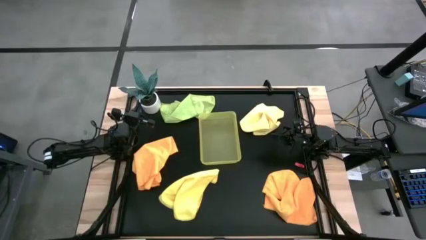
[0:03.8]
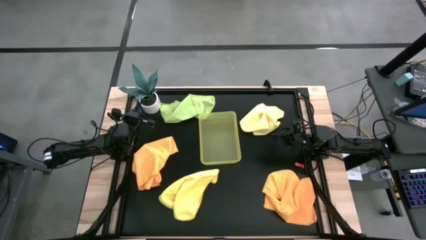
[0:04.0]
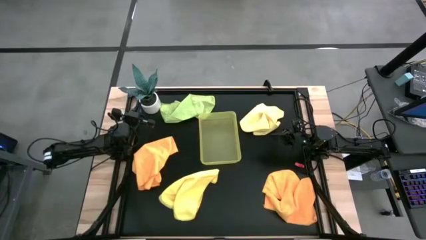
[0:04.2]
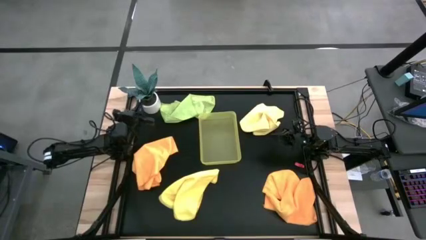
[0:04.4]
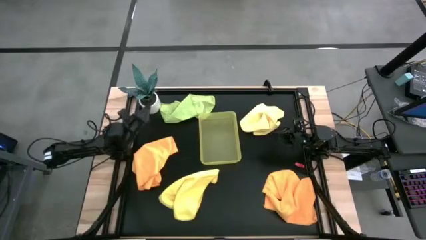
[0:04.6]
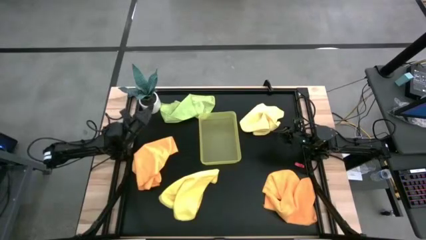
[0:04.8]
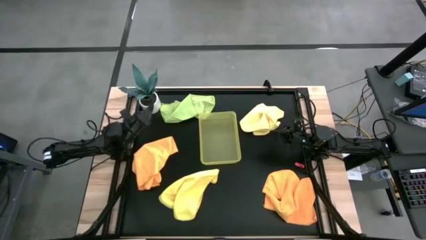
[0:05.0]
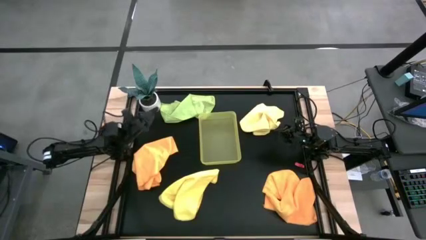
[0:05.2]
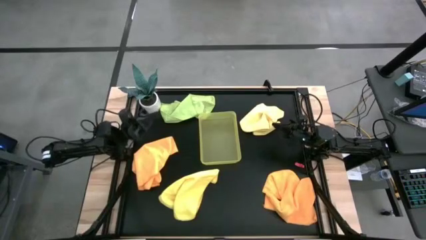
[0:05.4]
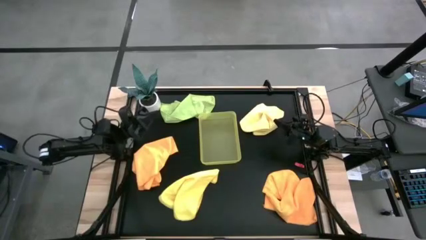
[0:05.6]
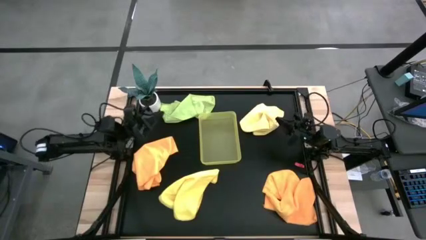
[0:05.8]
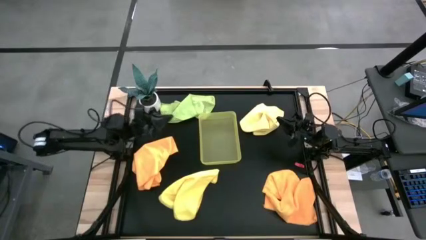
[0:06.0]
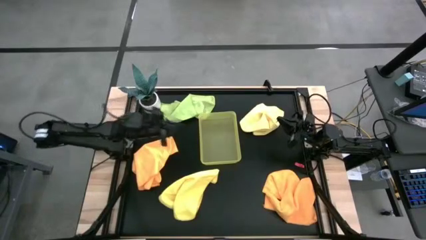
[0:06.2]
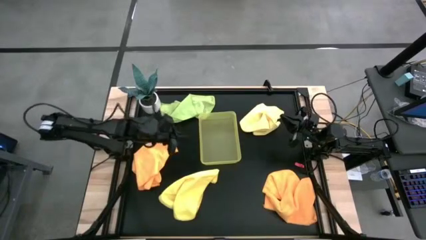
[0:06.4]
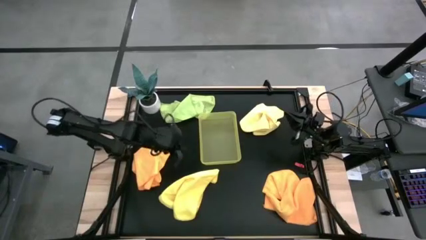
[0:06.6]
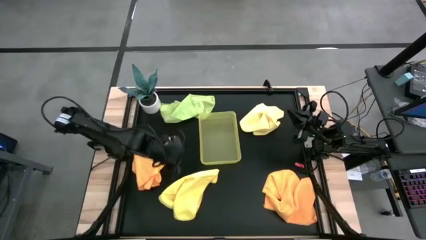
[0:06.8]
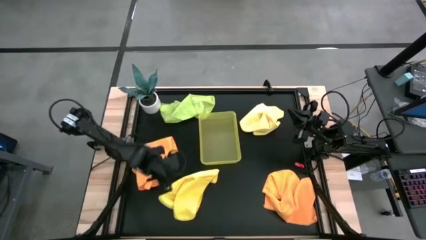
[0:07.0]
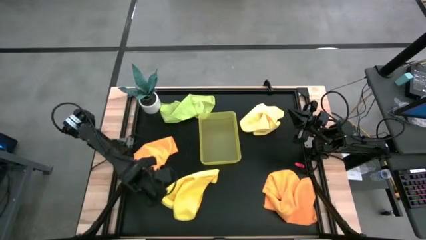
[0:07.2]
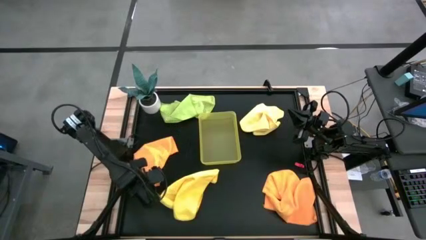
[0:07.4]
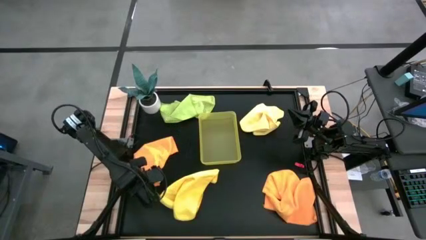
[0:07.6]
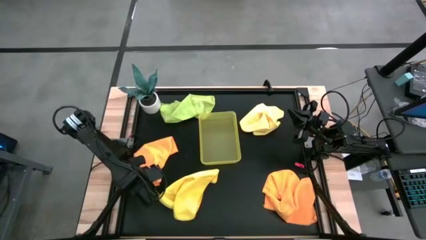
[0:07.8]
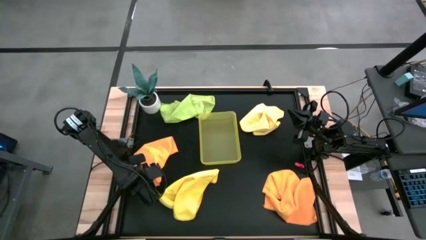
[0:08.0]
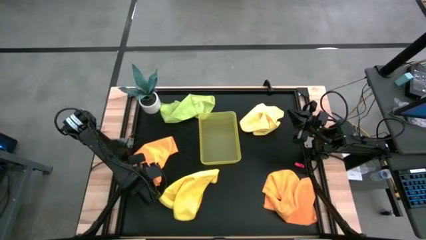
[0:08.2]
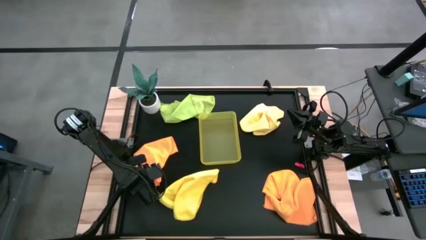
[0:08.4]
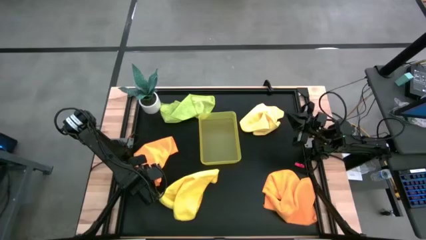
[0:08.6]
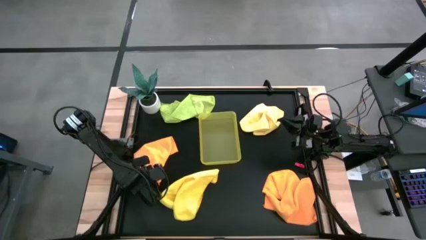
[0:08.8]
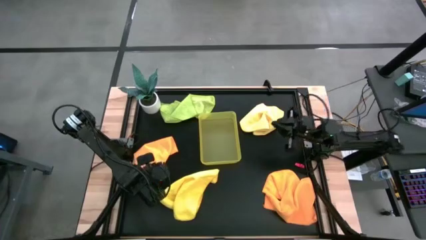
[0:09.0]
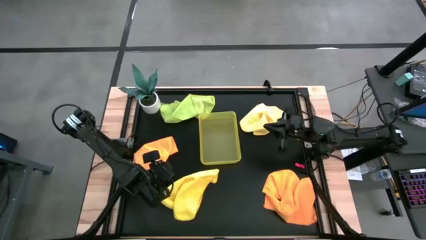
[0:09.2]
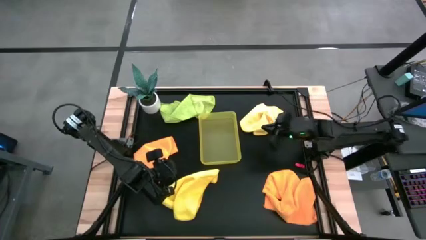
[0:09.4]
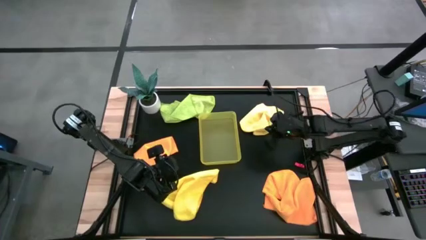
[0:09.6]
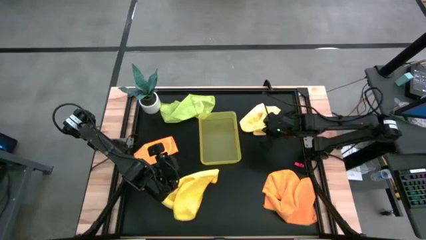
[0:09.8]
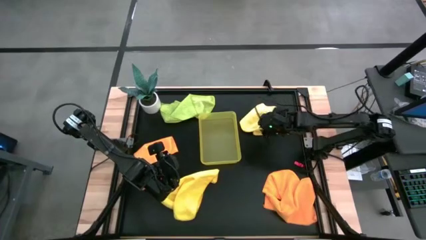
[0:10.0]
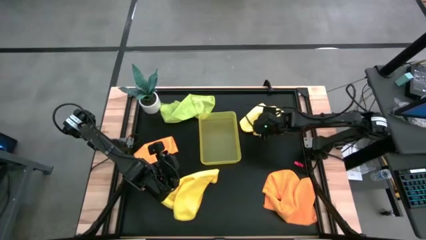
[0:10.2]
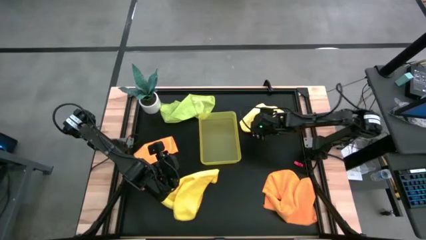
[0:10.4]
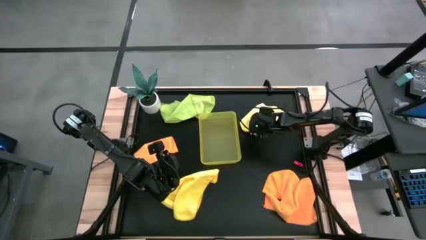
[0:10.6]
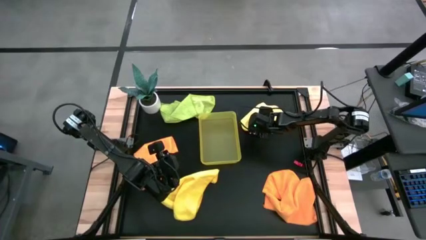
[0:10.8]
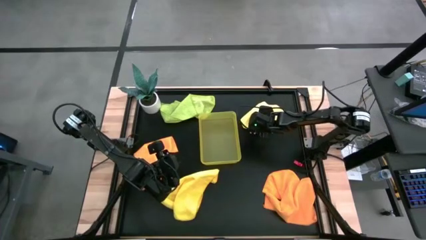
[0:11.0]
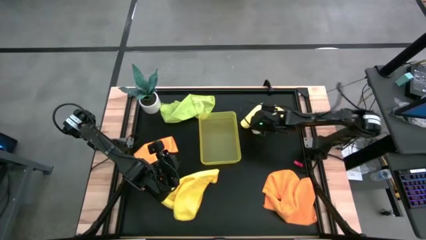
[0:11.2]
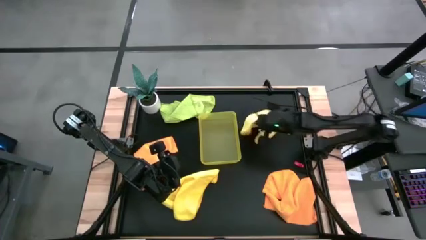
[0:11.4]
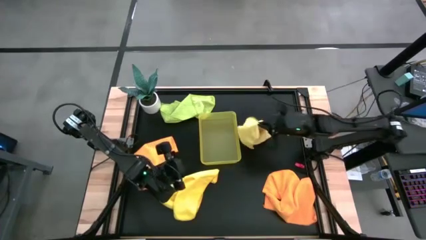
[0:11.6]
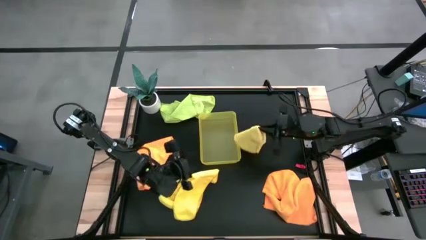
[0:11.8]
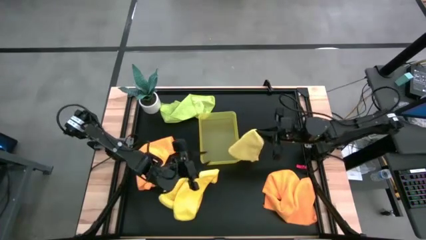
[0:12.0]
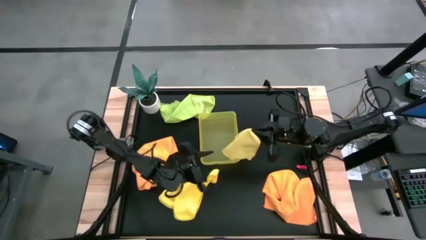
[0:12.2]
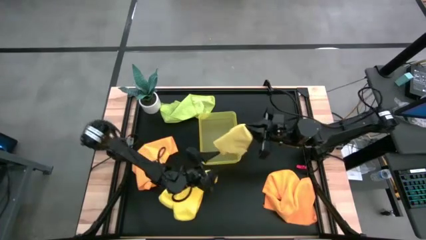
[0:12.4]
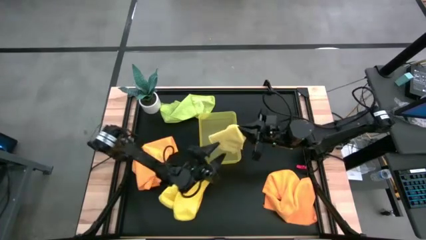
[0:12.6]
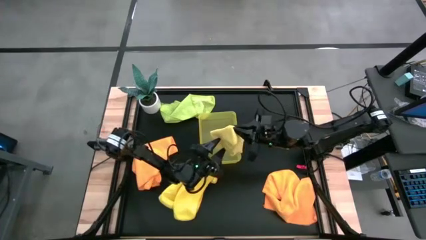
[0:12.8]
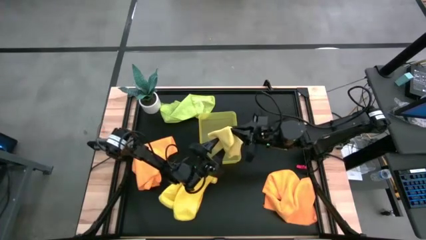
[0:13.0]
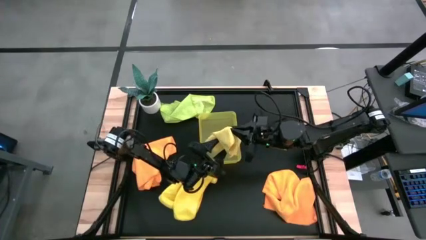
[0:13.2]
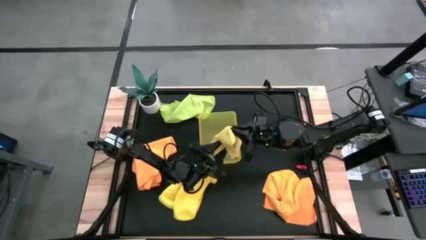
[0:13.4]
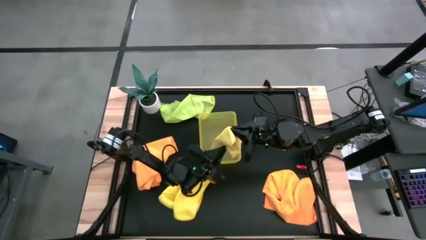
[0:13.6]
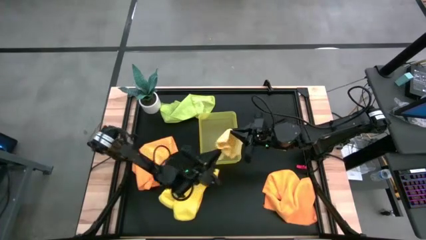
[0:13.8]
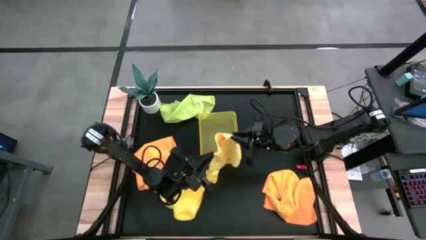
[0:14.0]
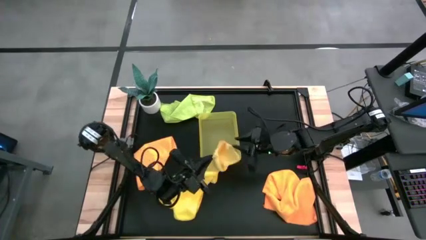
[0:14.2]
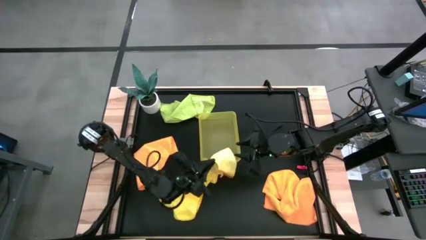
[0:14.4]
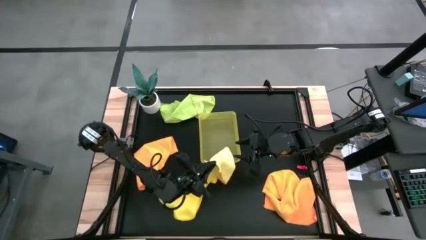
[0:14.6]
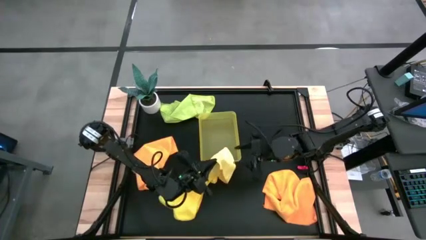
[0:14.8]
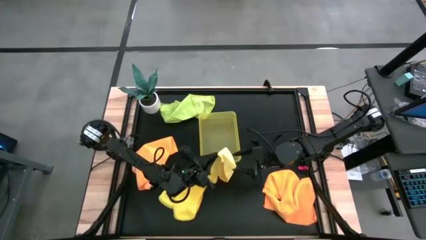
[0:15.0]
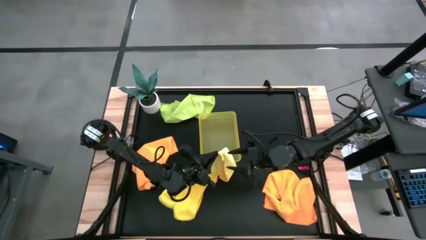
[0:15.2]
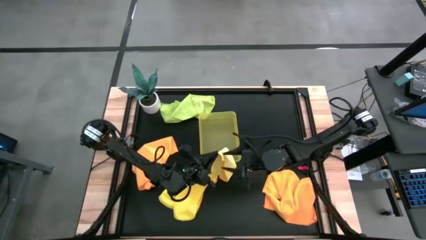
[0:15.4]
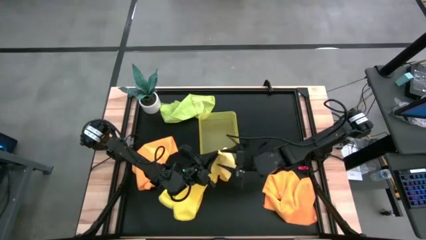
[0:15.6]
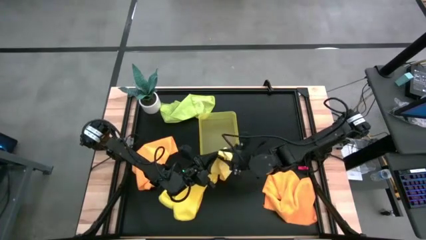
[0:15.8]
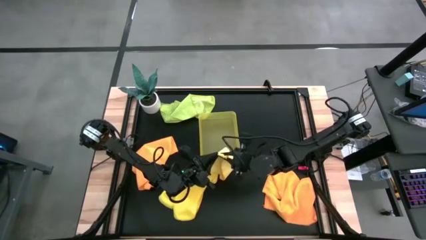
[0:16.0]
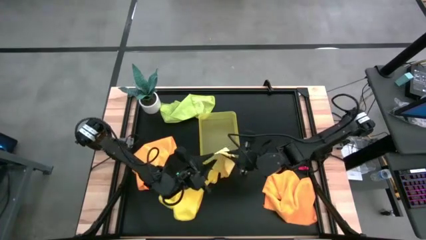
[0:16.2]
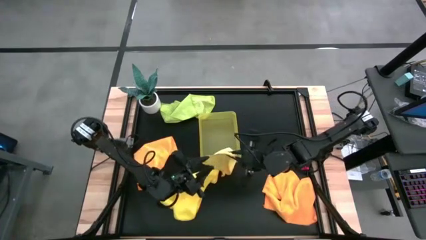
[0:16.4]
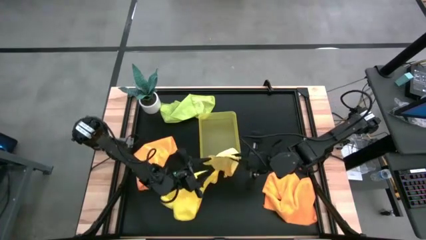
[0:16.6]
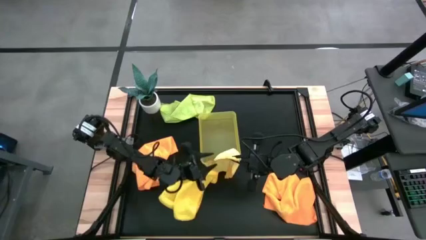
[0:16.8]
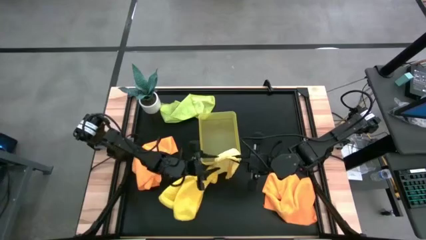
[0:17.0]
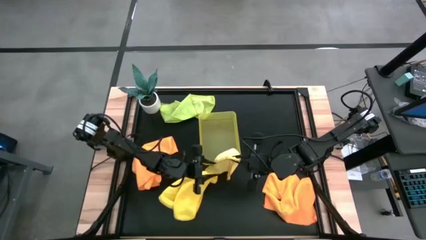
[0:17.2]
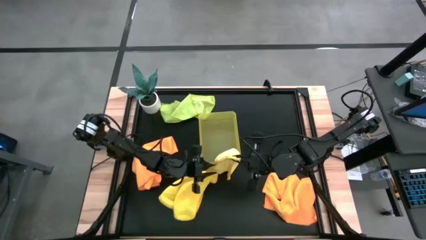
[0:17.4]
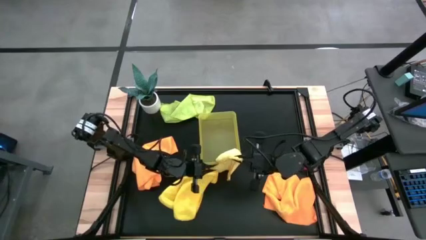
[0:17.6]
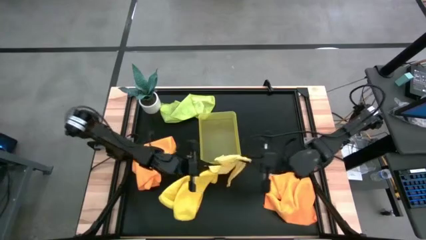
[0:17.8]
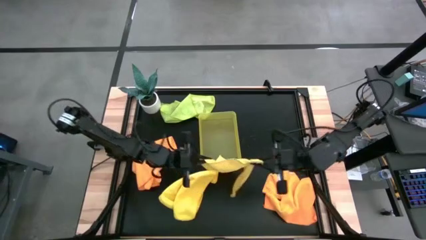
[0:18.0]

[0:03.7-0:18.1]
Task: Fold microfiber towels
Fold the top yellow microfiber cloth
